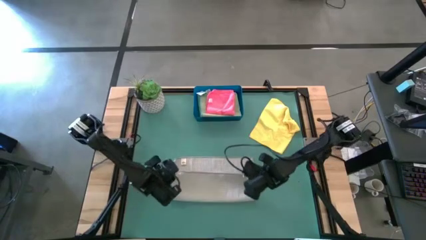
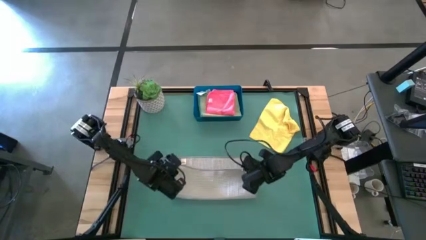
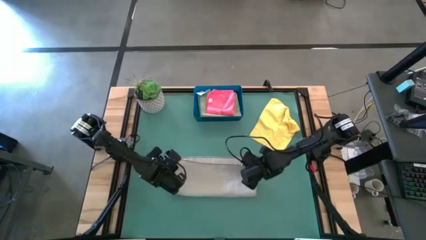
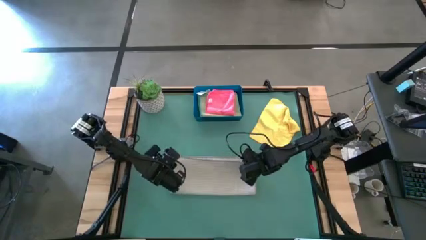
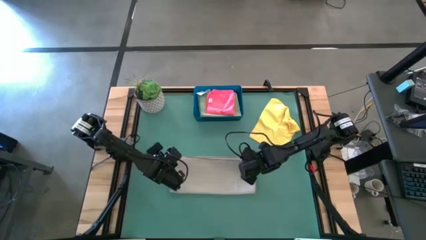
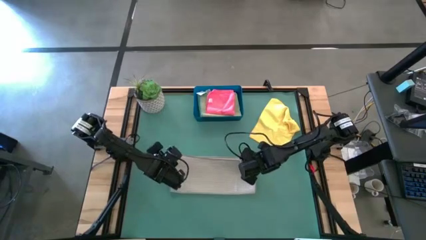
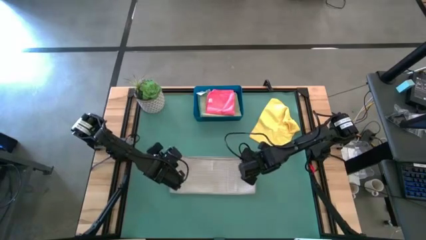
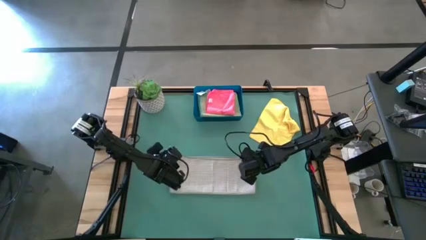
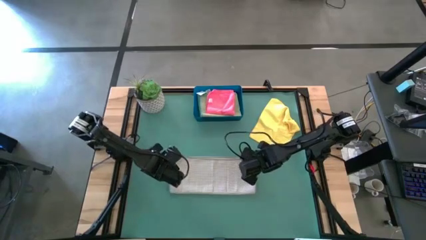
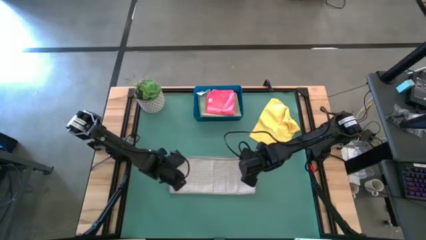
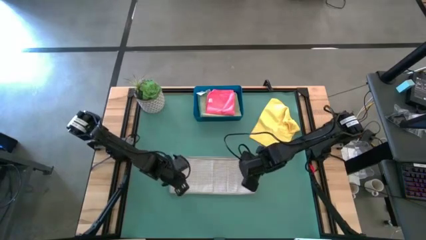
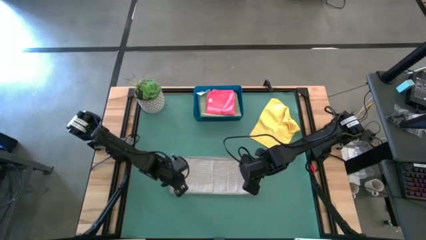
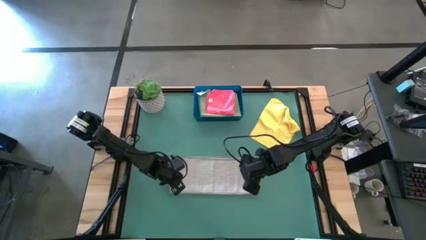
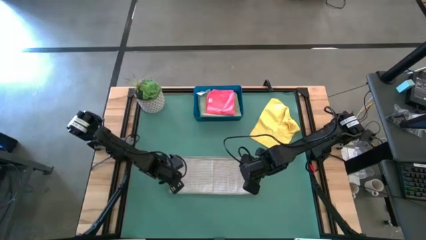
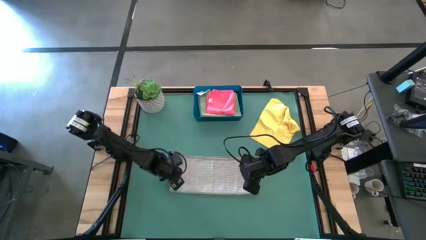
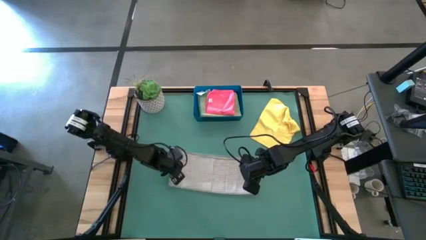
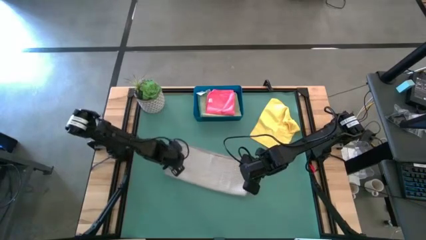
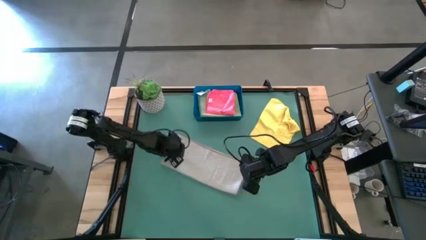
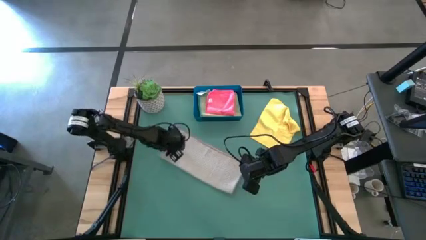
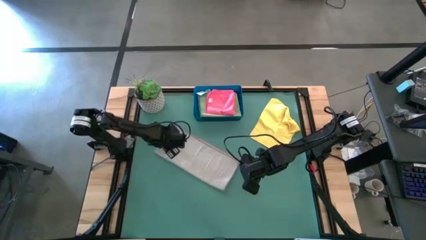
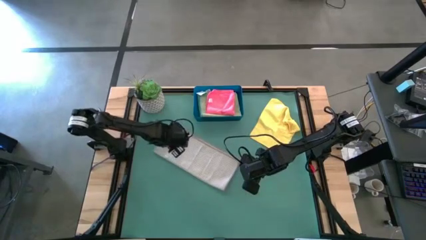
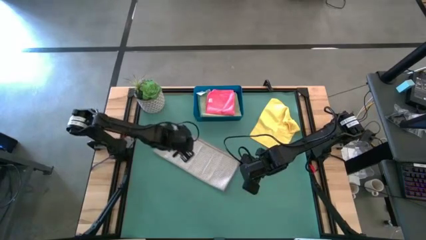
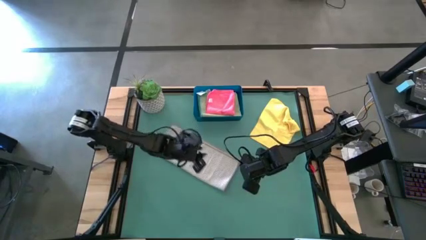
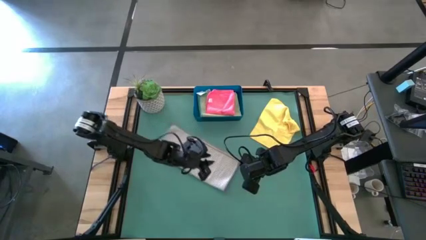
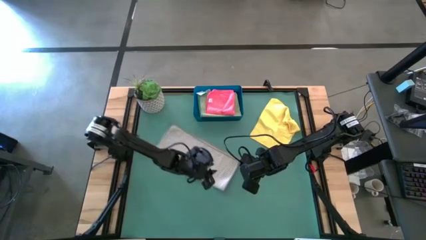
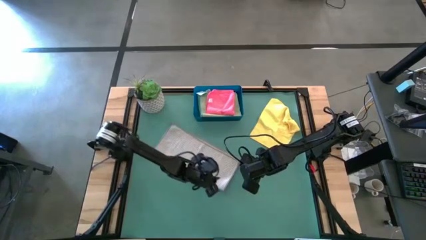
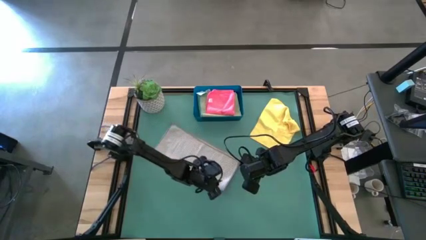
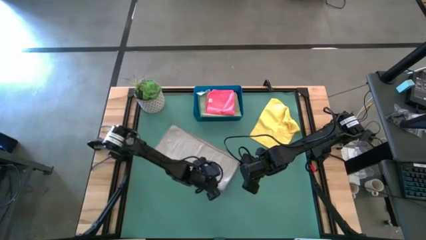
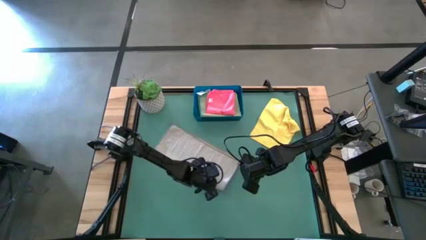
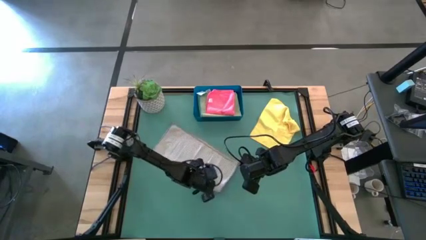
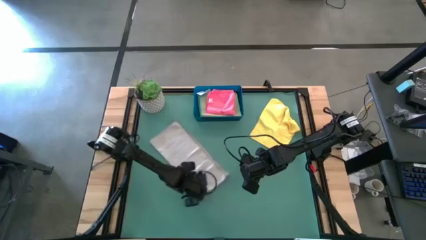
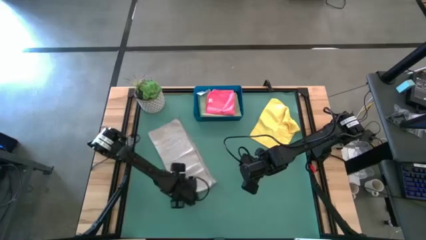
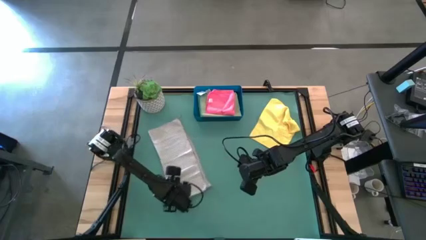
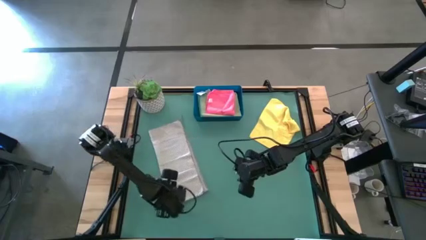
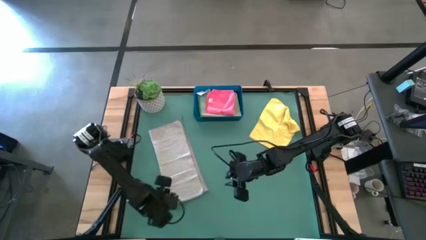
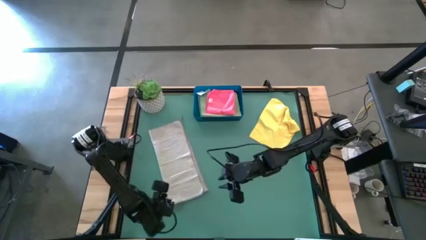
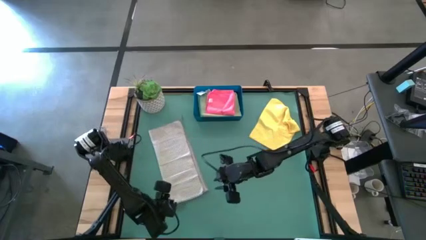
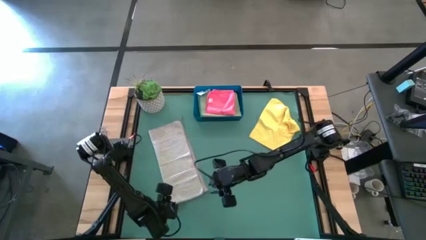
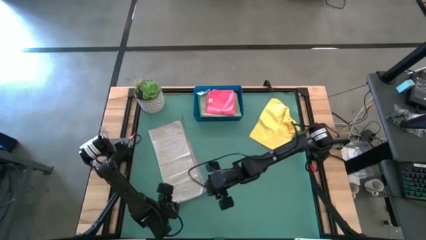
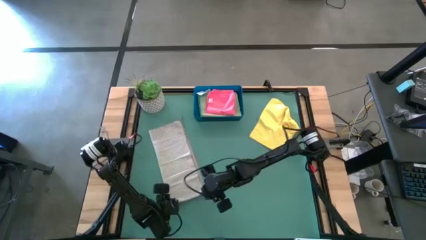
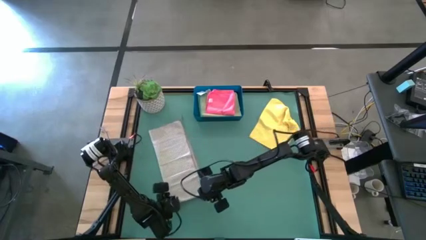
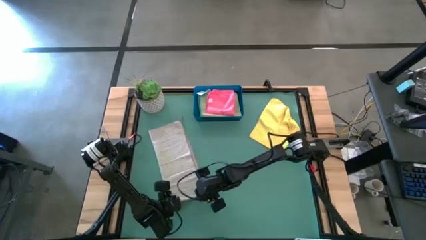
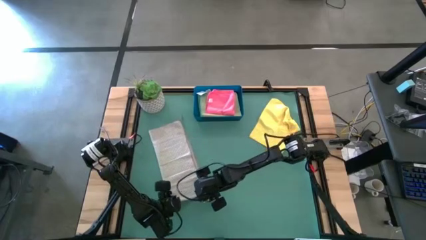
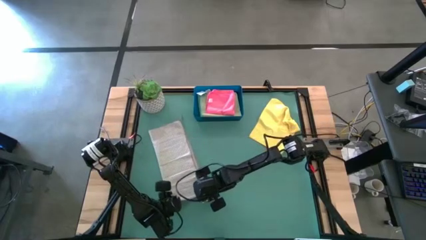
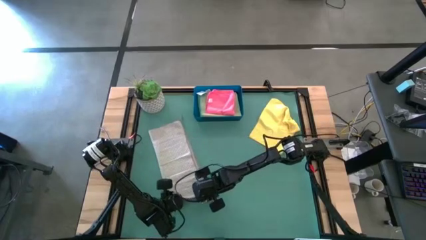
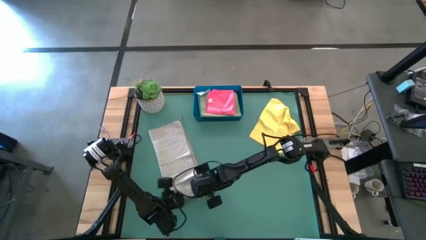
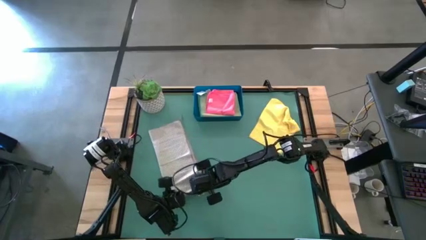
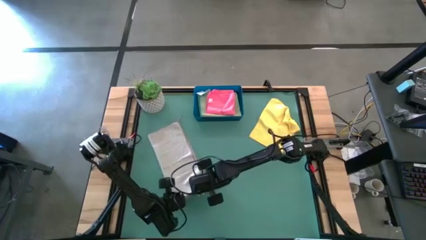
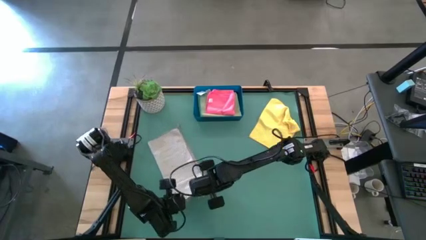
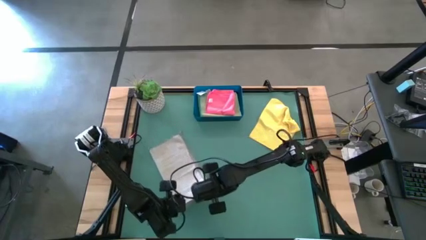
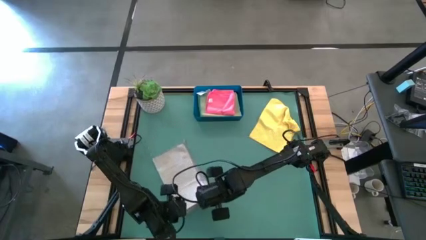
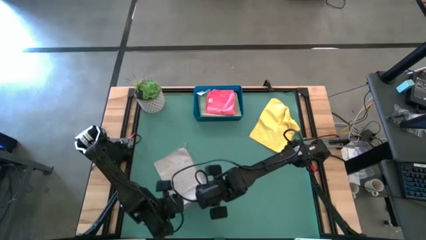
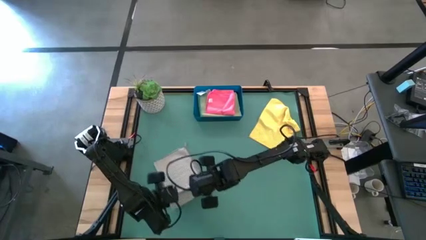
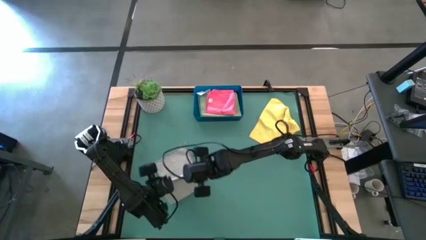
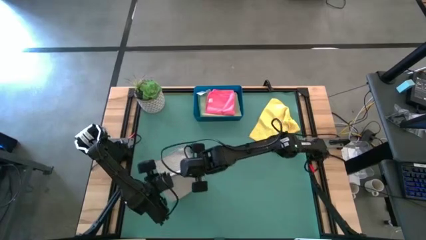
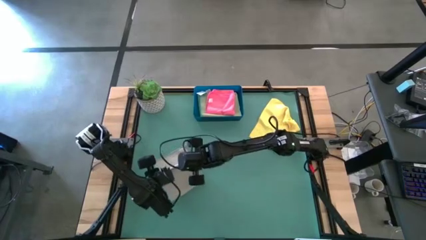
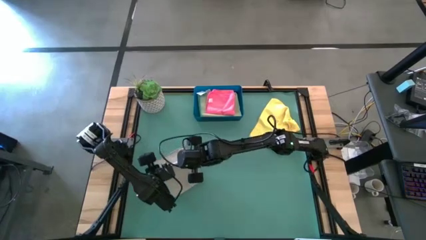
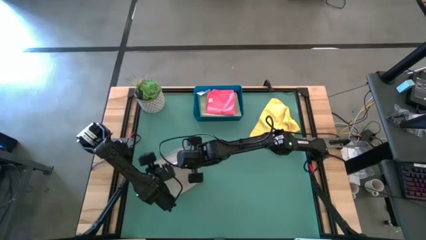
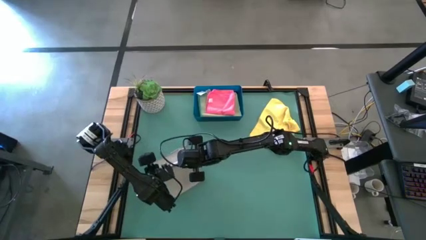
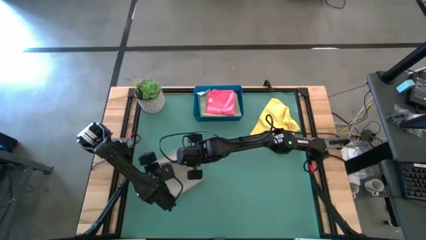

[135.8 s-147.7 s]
Task: Fold microfiber towels
Fold the gray microfiber towel

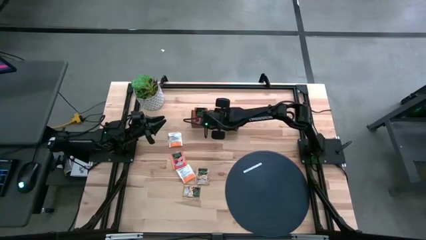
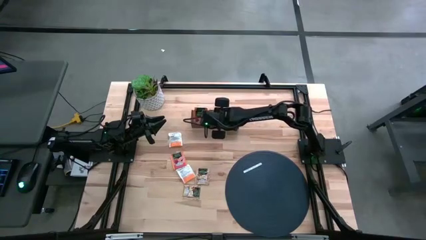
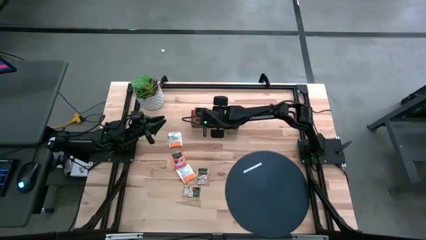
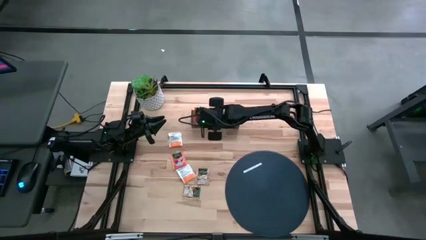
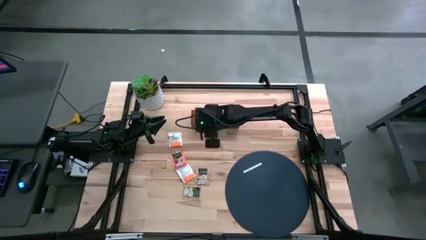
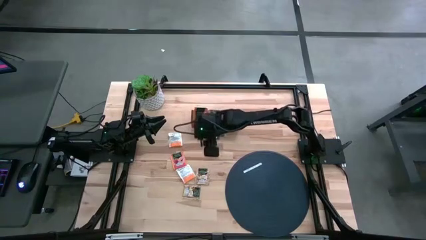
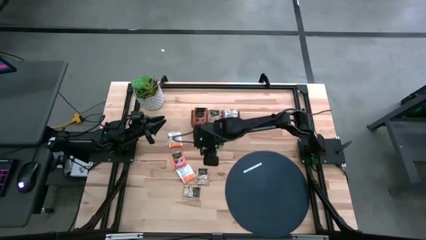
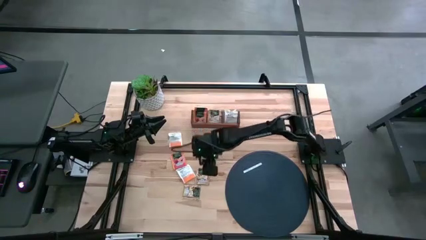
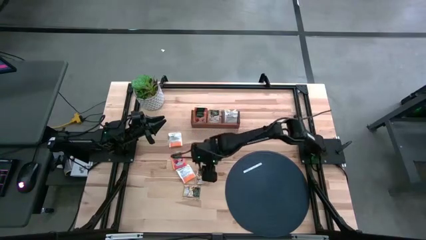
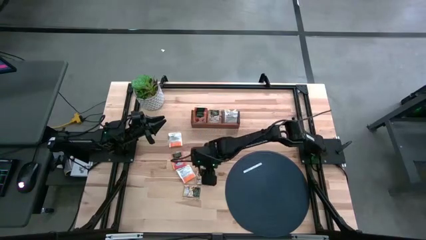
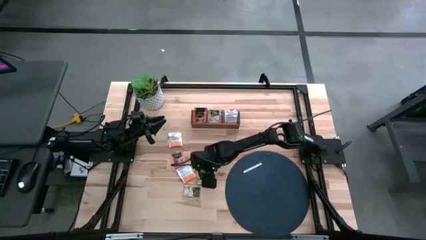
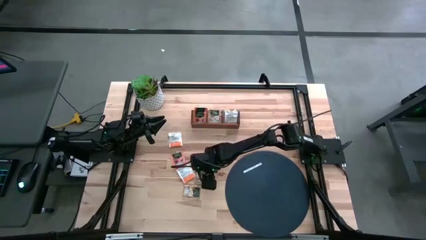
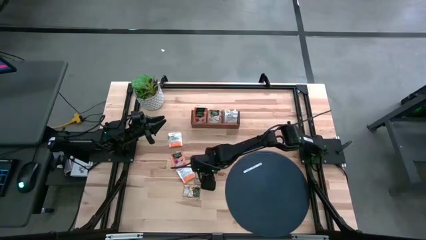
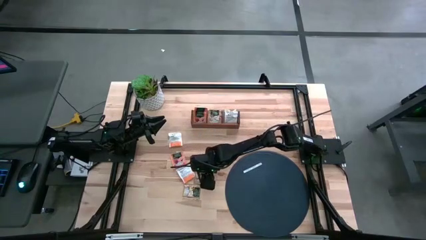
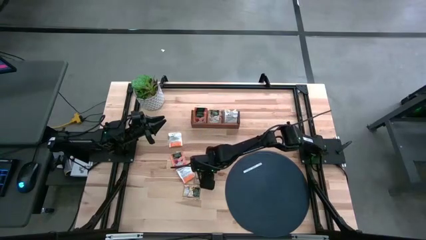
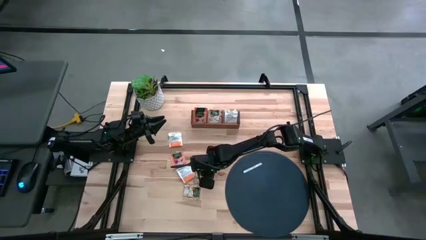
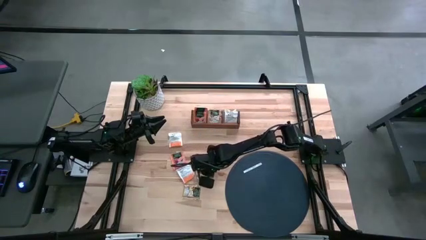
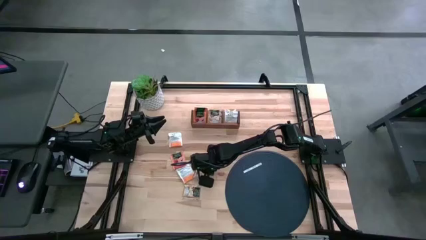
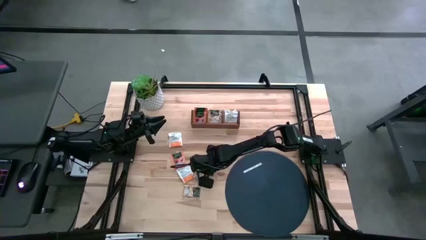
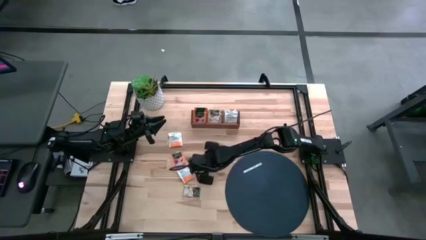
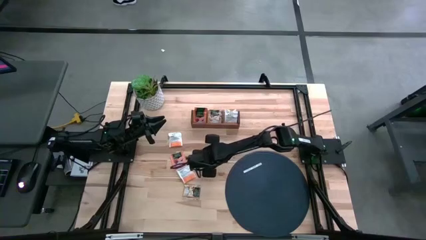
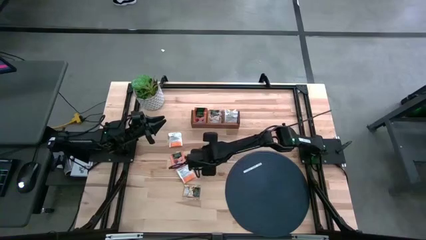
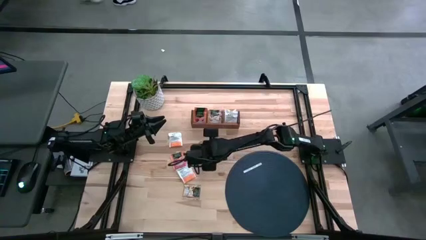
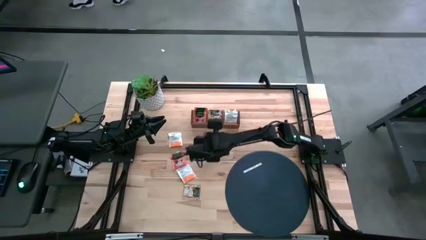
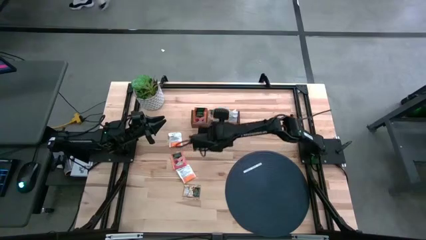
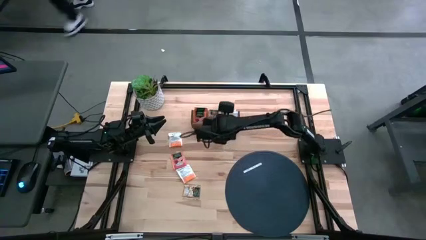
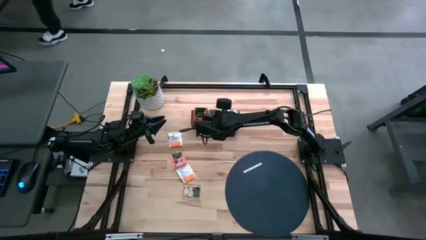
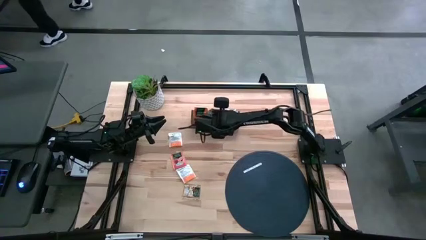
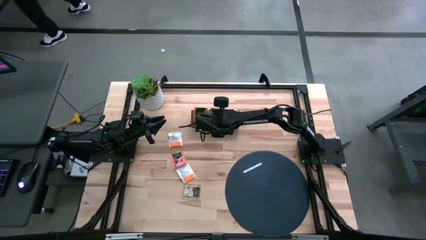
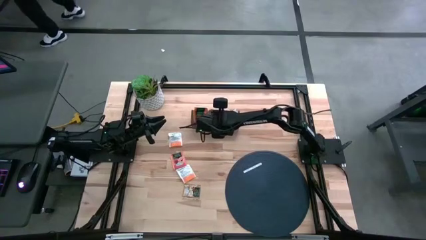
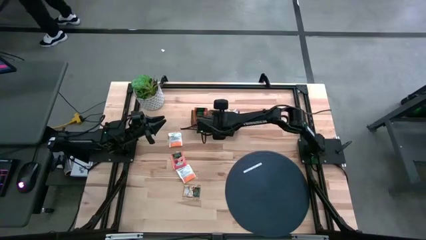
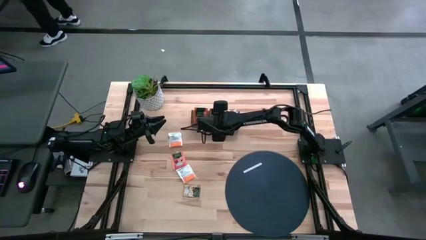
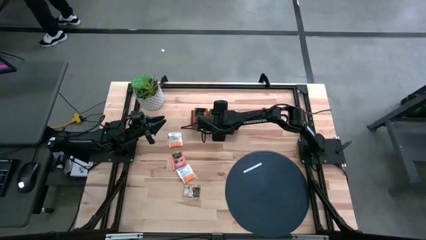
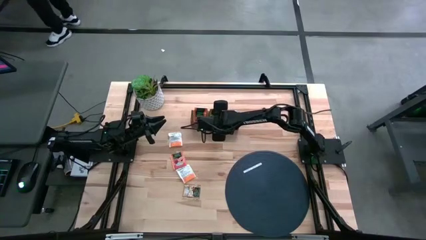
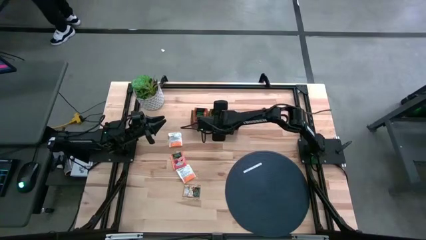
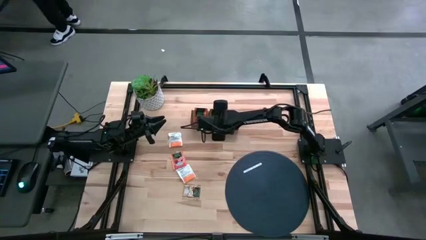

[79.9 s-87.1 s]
Task: Pick & Place Tea
Put the brown tea sachet into the middle section of the wooden organizer
